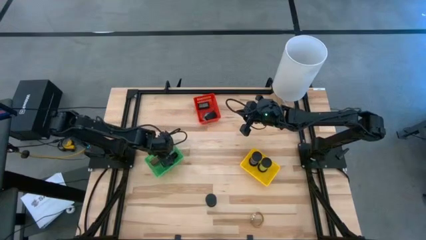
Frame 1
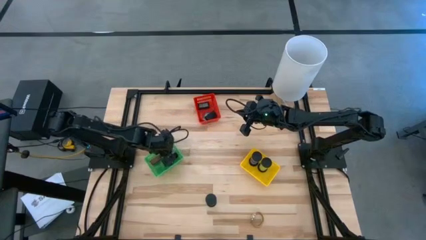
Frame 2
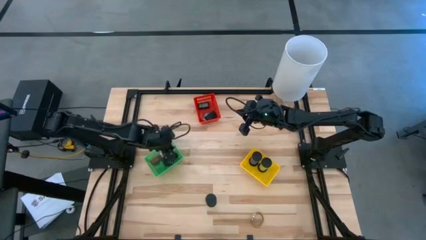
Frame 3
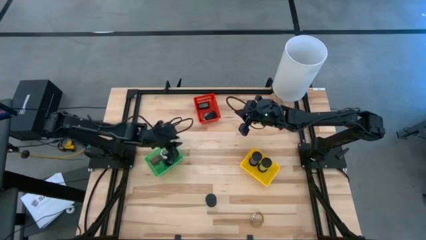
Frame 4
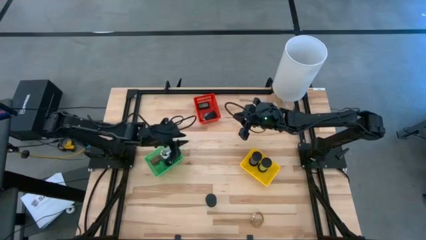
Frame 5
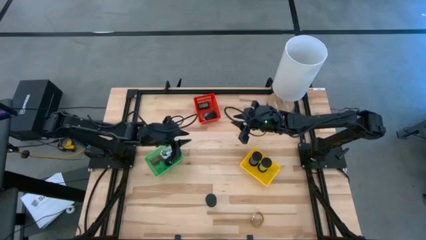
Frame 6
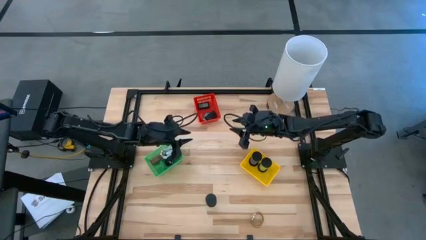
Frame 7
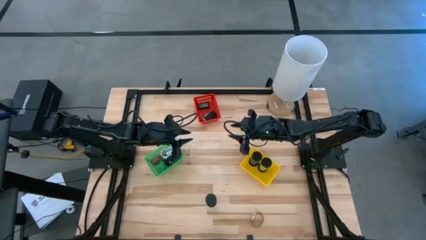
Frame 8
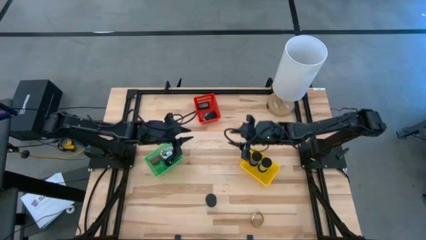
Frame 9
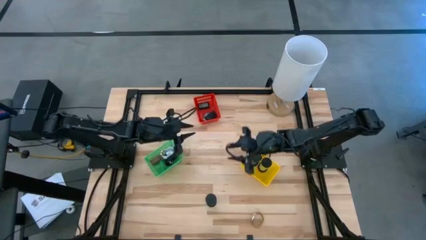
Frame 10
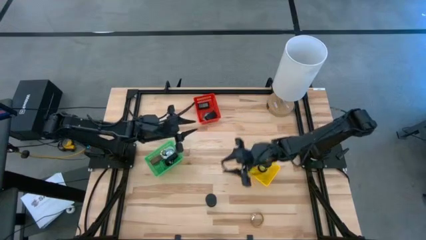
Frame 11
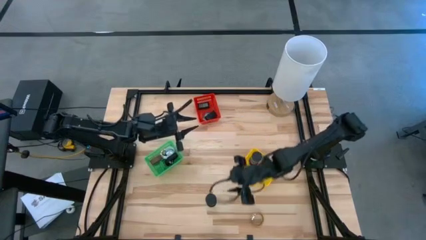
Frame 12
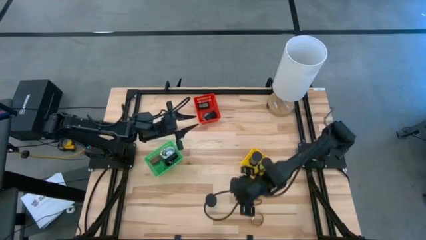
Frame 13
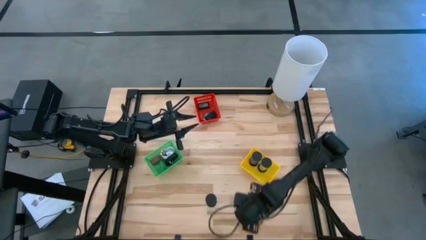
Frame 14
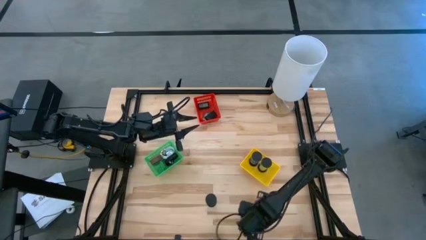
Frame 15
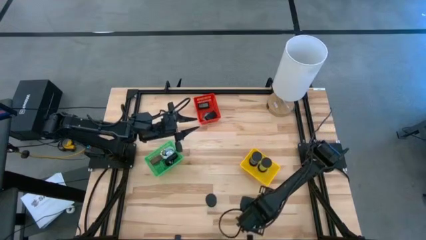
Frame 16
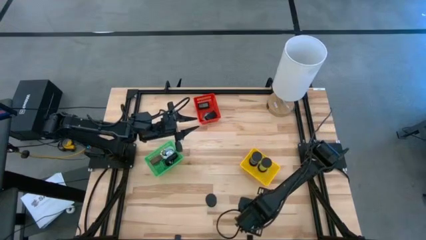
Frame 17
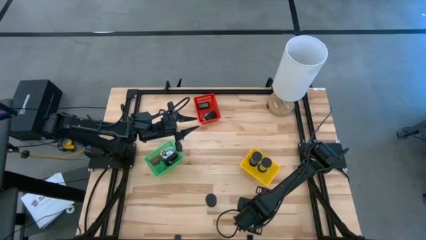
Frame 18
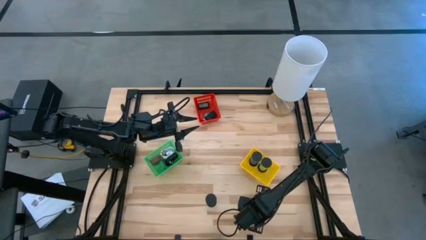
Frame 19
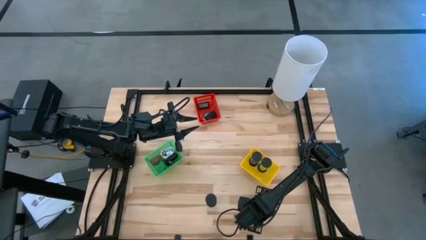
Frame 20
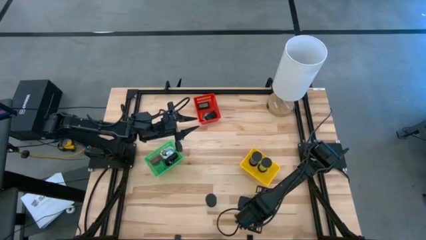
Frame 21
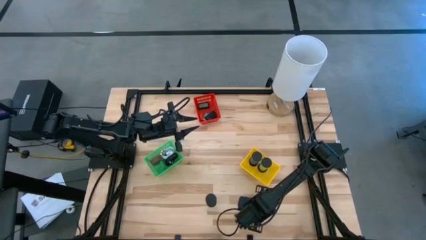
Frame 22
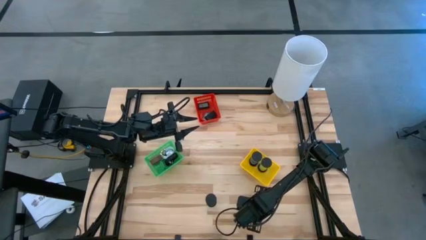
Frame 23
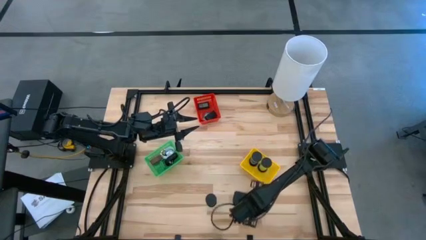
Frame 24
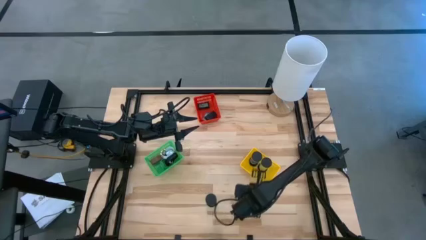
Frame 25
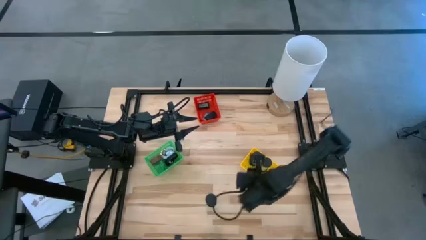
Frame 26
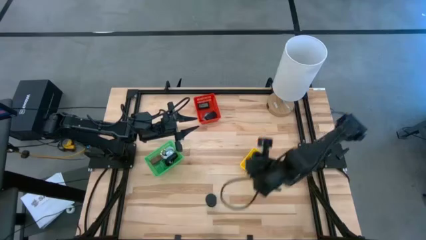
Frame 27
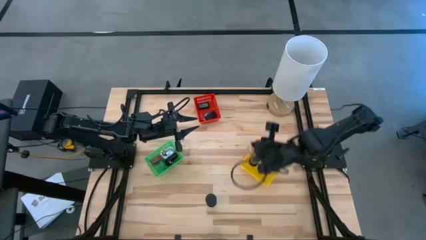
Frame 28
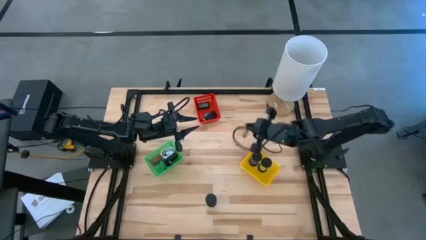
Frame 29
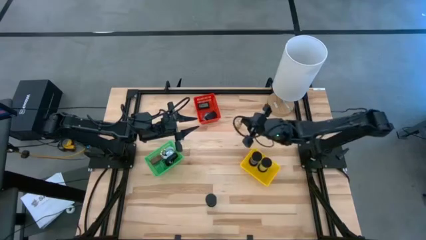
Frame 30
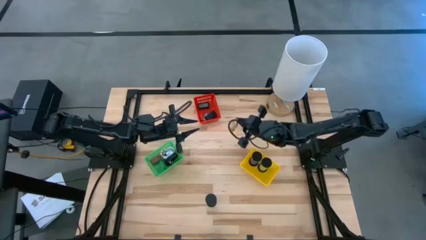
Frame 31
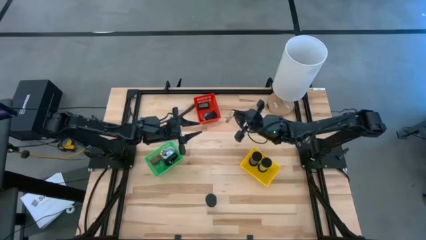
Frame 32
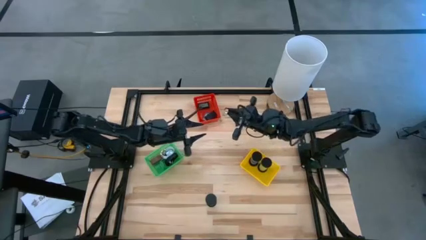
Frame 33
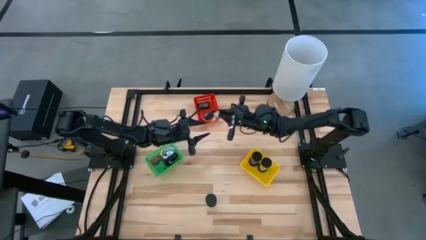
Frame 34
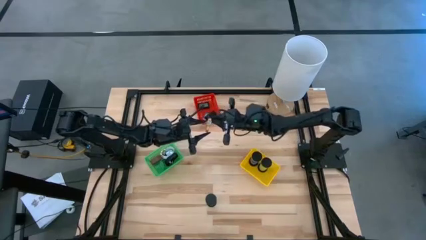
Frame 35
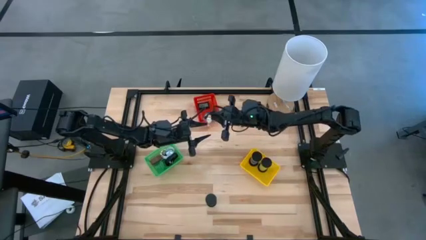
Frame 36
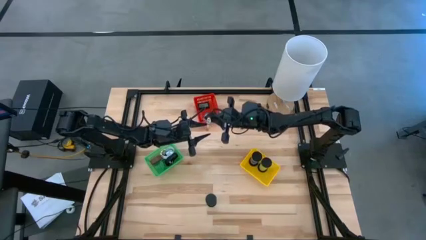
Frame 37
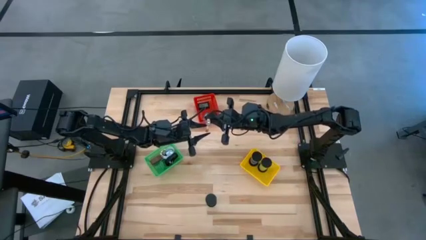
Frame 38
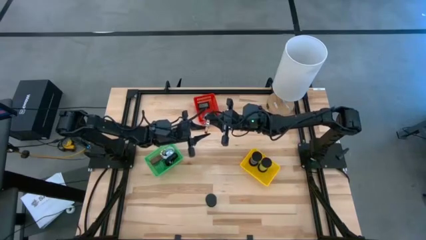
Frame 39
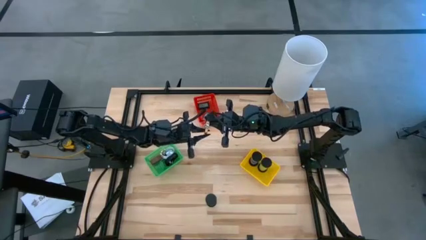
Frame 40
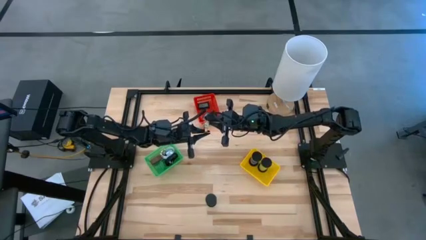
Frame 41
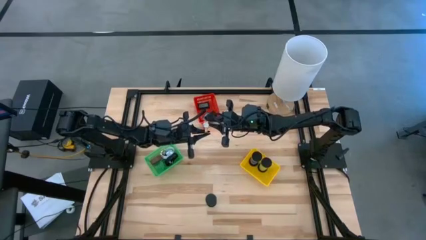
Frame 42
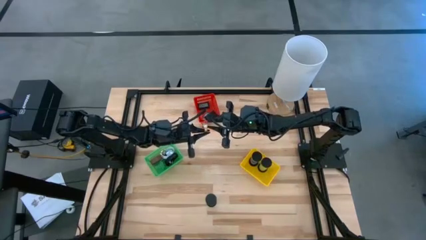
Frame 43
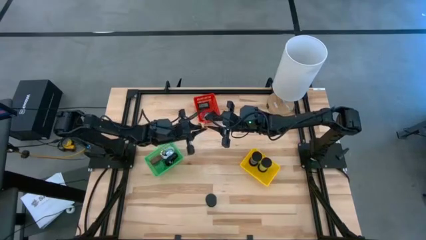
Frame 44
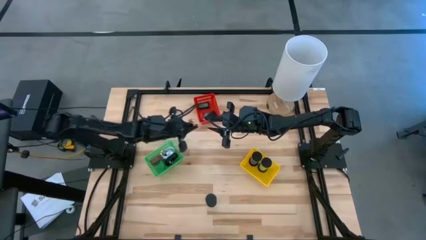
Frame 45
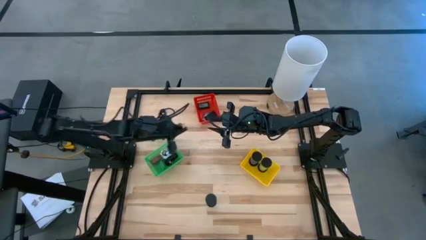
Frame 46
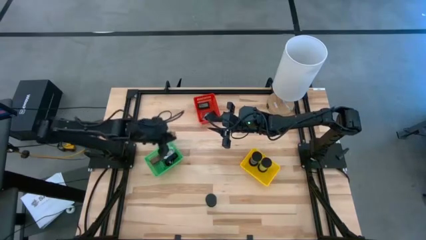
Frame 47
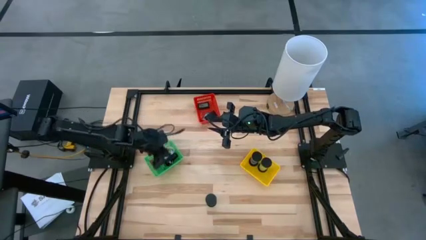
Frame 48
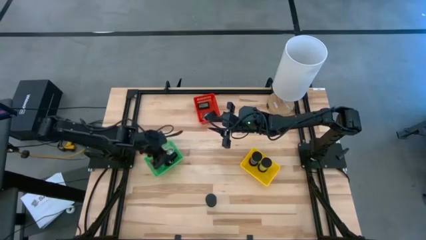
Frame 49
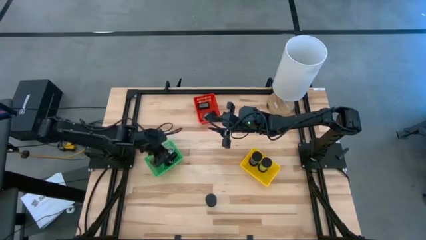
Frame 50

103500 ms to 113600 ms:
Task: Pick & Place Office items
Put the gold wrist watch into the green bin

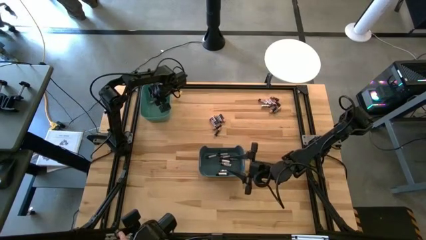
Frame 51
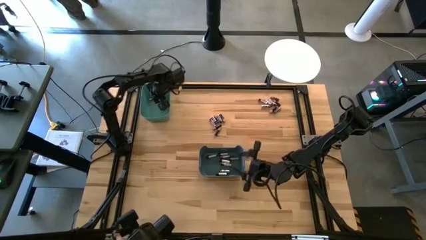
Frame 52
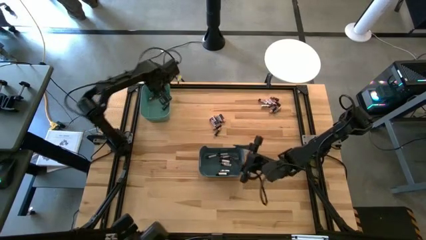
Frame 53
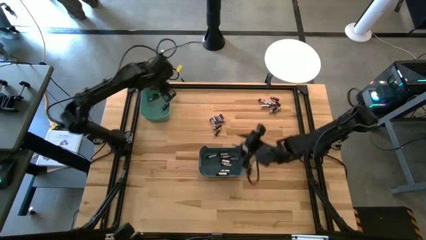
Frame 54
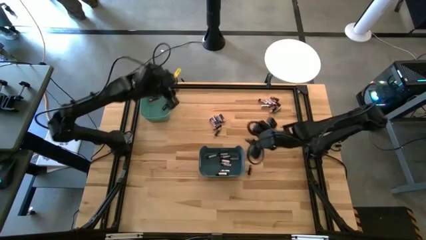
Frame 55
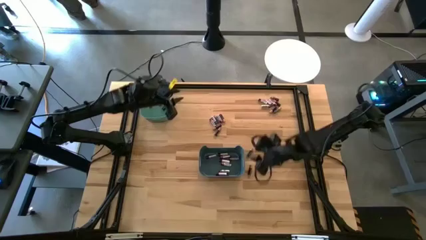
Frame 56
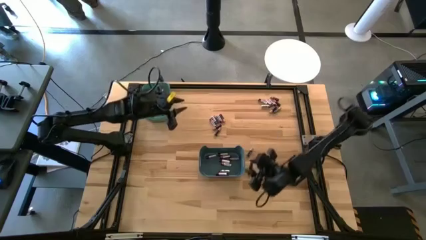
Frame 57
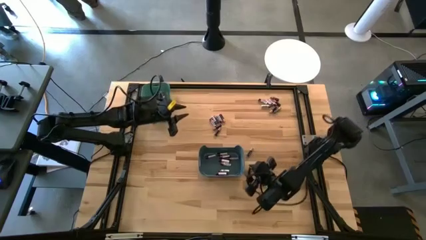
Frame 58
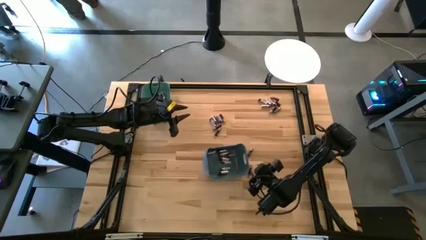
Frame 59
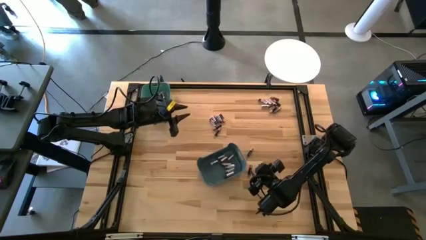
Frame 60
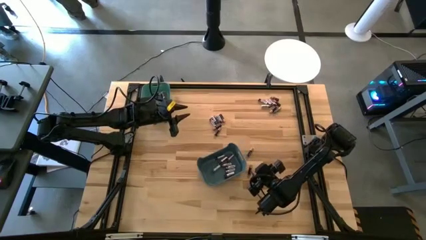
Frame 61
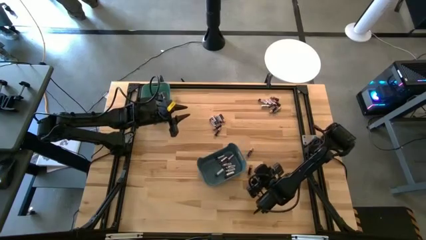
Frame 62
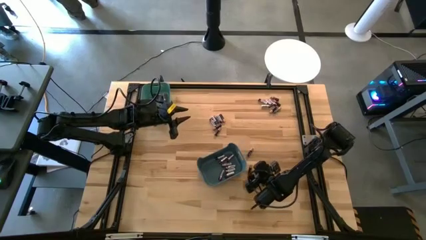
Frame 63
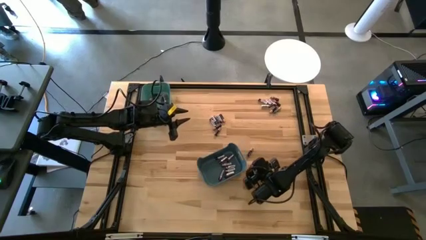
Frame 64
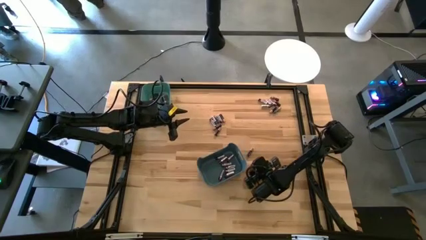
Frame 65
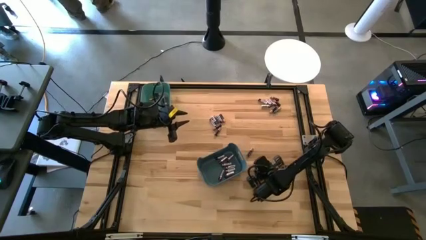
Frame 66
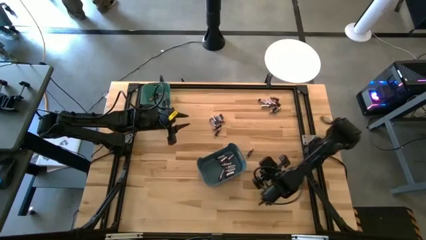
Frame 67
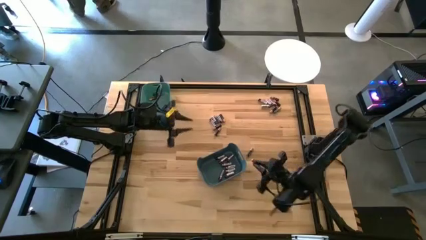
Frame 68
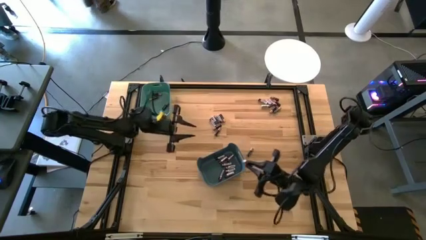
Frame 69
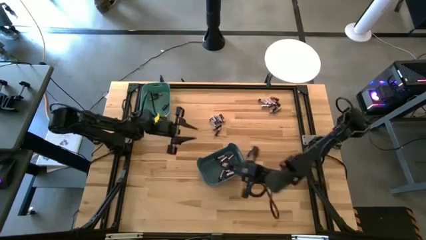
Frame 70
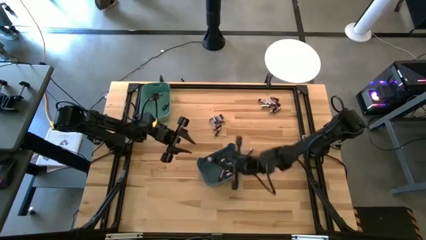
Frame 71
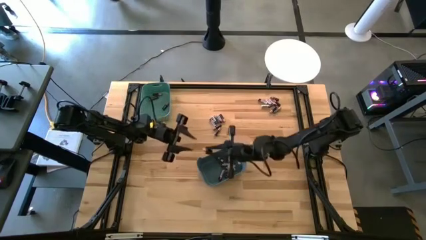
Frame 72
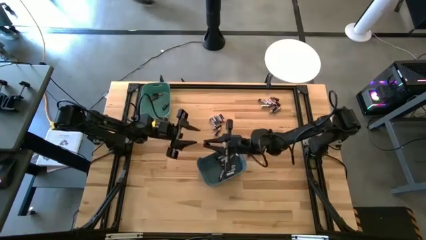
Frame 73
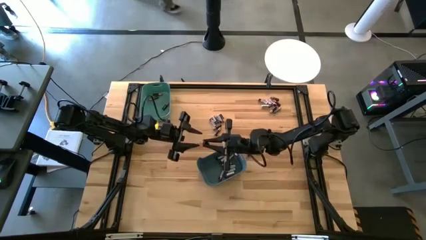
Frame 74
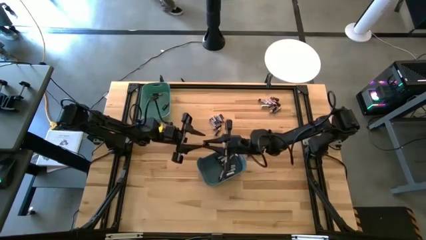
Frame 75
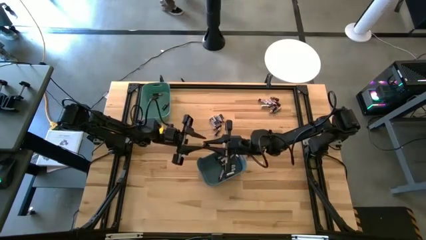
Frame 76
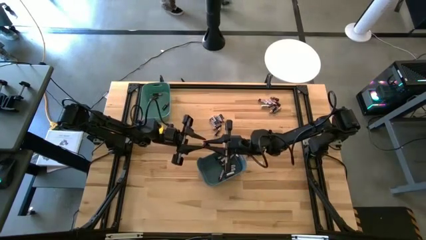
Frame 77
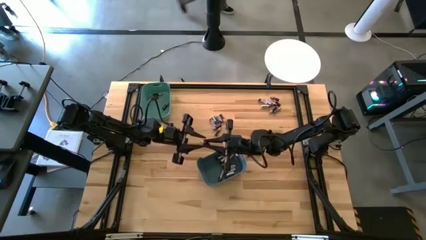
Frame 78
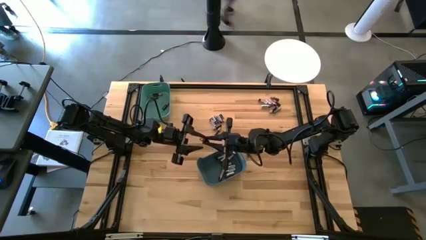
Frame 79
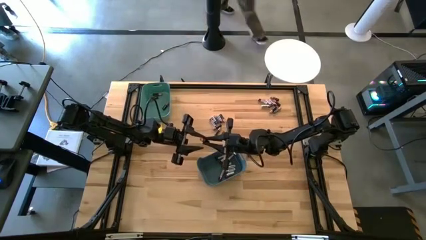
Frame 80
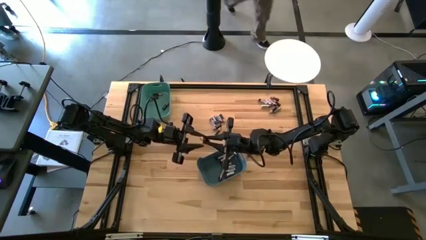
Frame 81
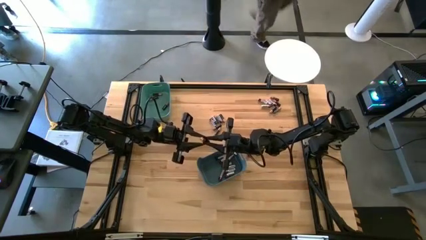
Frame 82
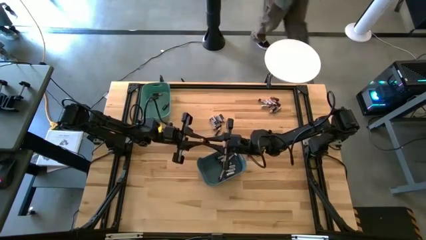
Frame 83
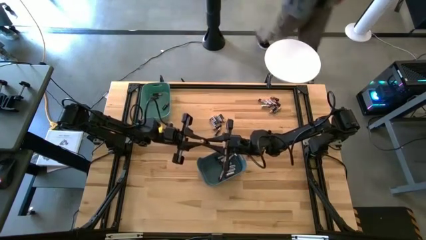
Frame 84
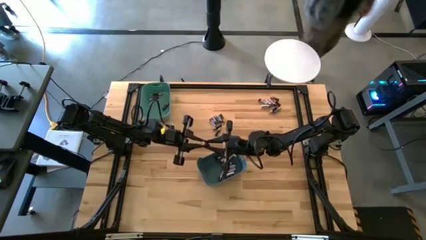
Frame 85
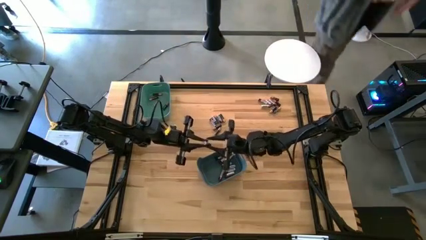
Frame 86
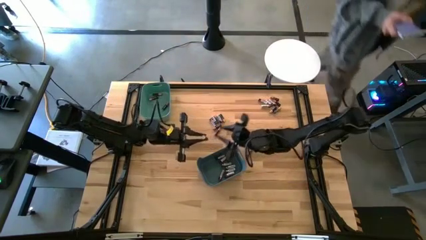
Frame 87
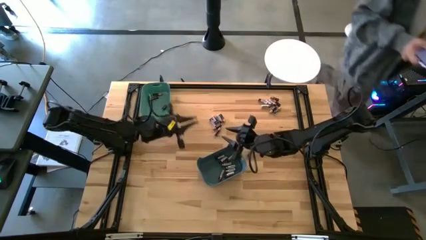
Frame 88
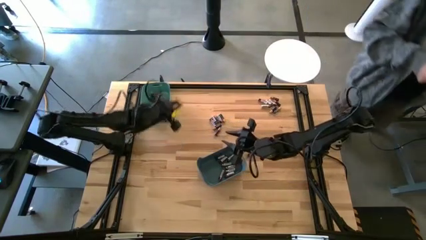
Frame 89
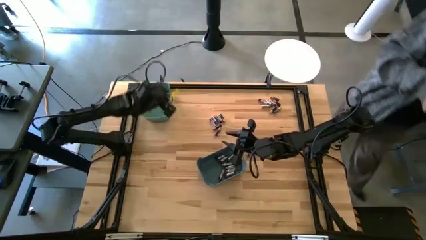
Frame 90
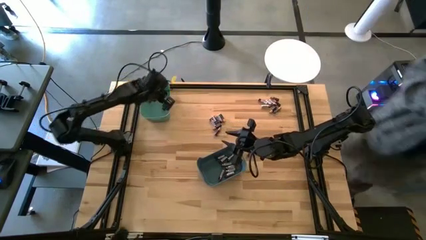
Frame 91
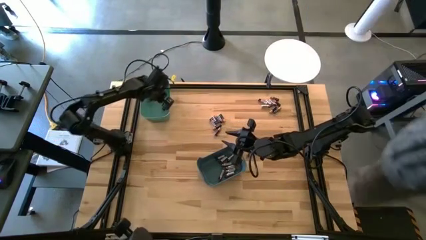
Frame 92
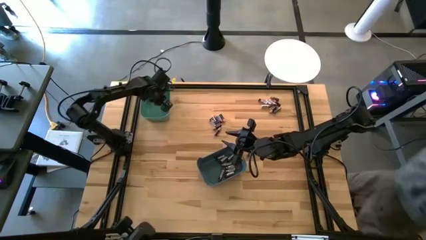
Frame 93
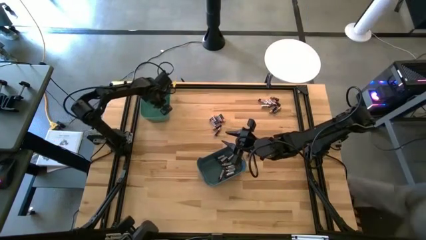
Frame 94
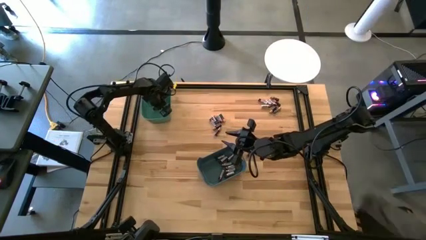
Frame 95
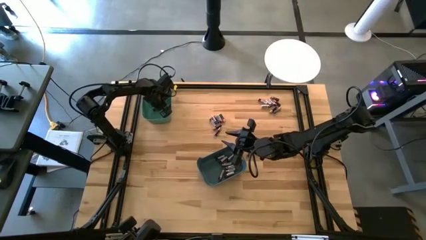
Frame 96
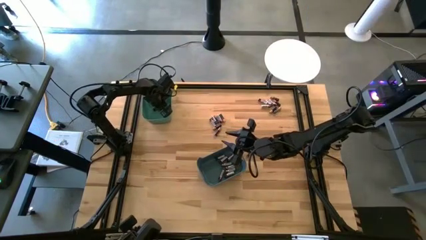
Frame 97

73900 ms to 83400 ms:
Task: Sort batteries
Put the black battery into the green bin
